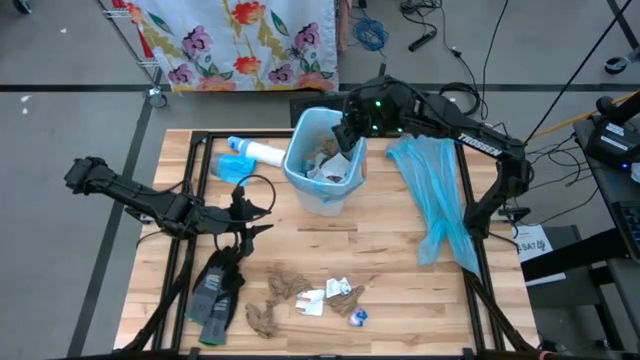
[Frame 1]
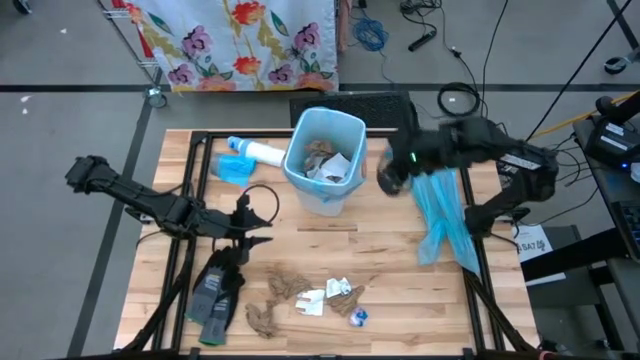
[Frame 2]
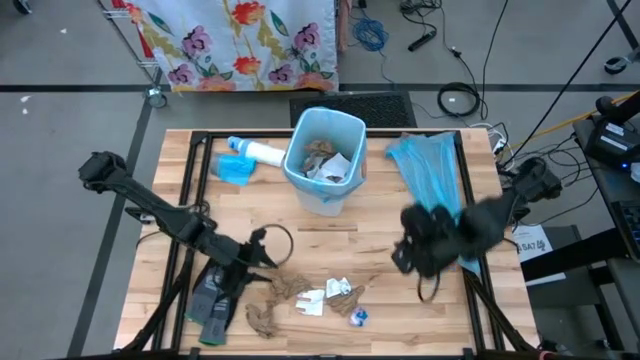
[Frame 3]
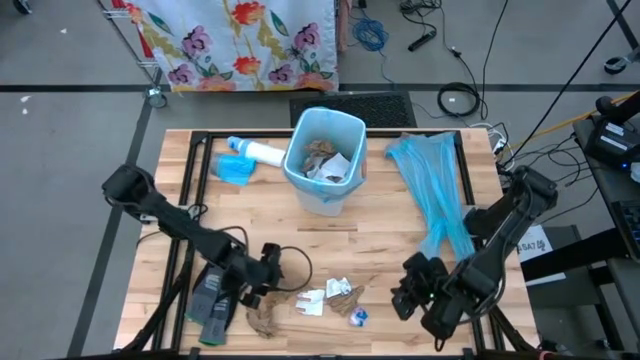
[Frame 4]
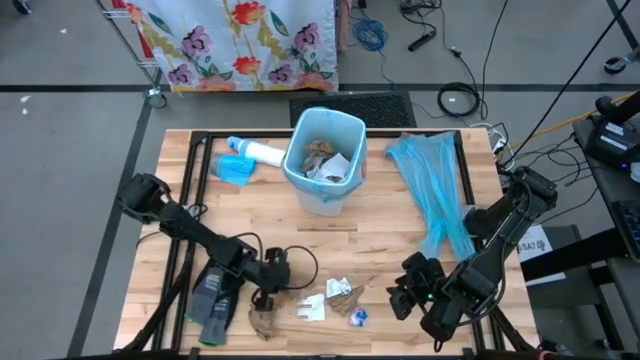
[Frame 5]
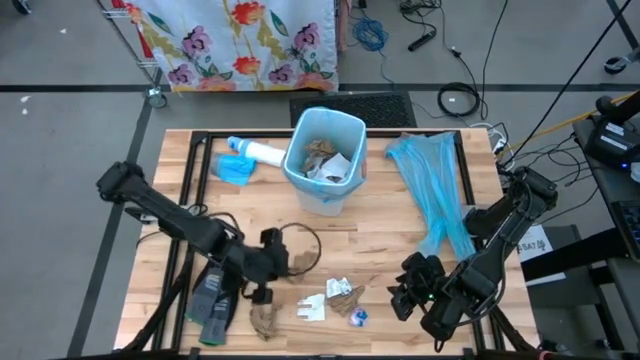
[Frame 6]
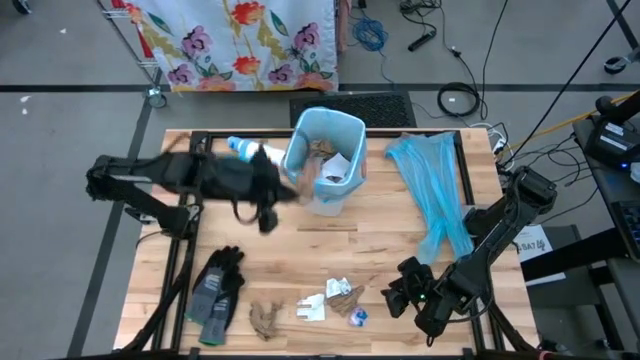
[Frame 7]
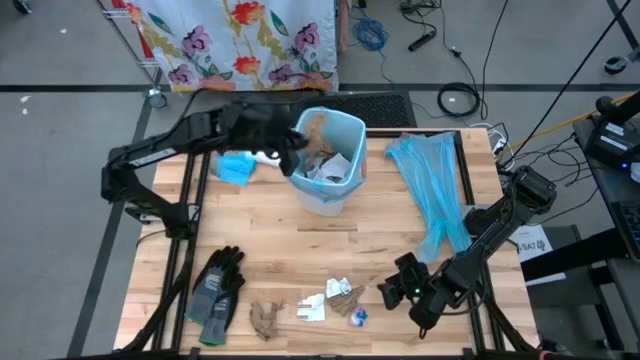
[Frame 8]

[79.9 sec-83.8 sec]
Task: place trash/remove bag and relplace
Put the brown paper into the trash bin

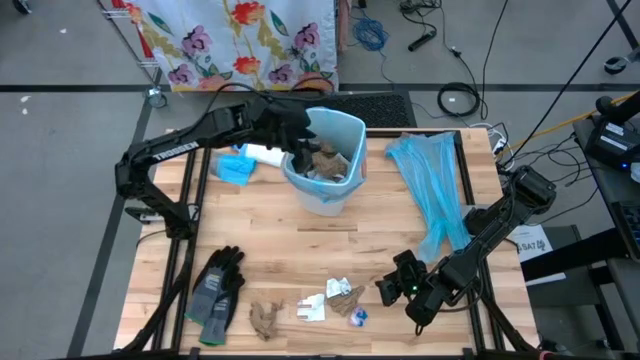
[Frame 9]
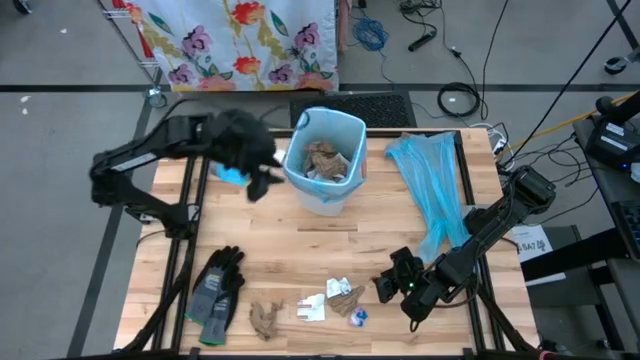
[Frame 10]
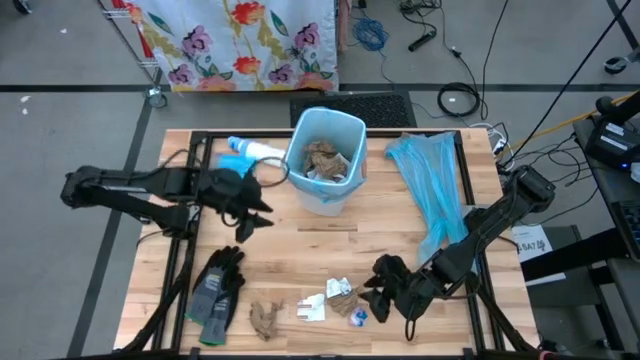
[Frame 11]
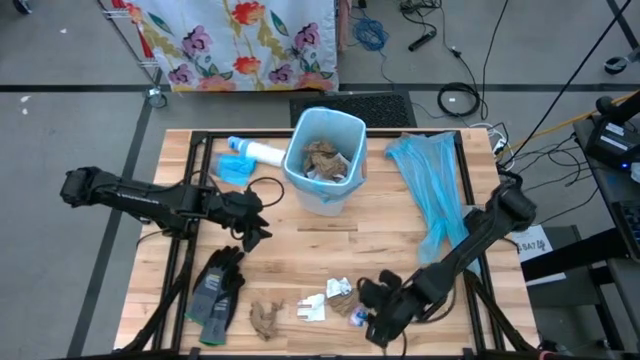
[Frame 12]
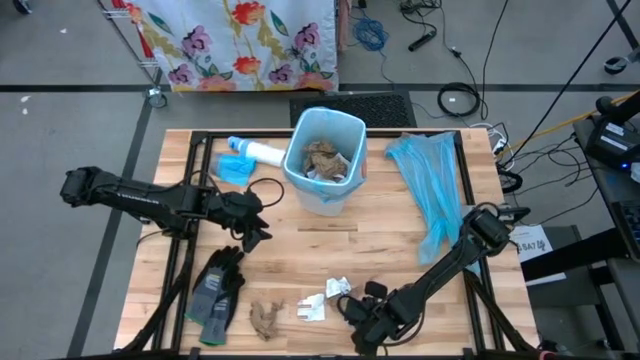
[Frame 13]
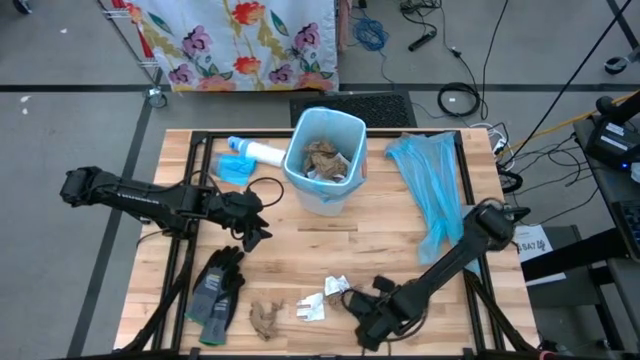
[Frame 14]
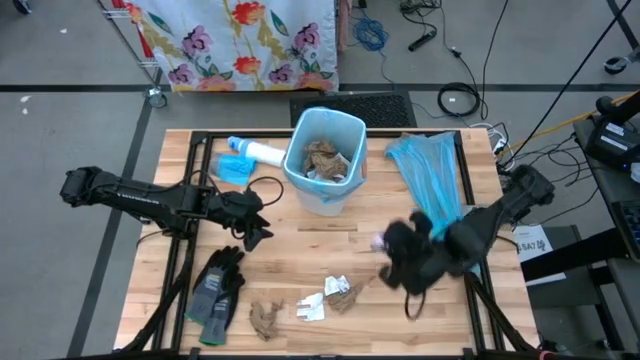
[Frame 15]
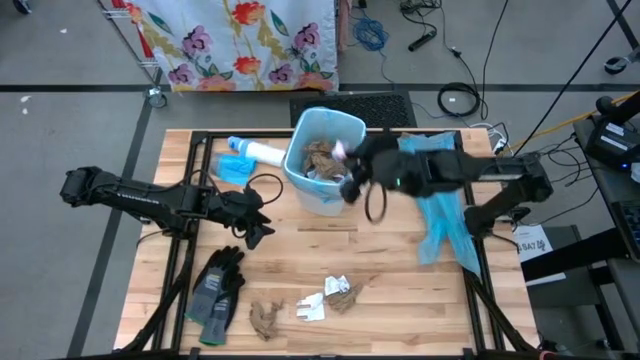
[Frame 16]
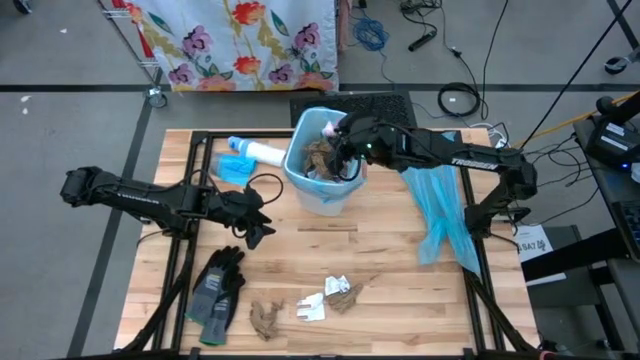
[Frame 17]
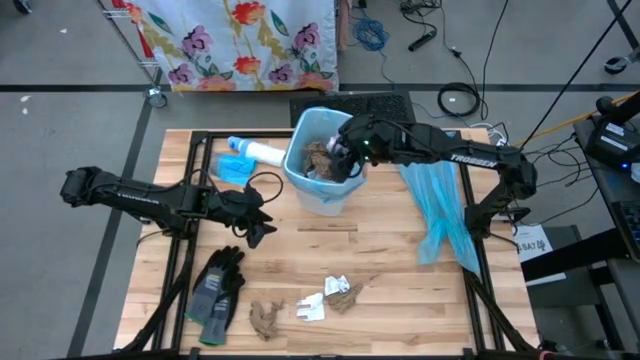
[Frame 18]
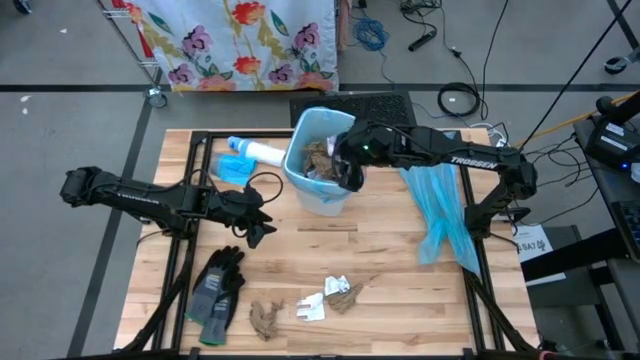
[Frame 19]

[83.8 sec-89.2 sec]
Put the pink trashbag into the trash bin

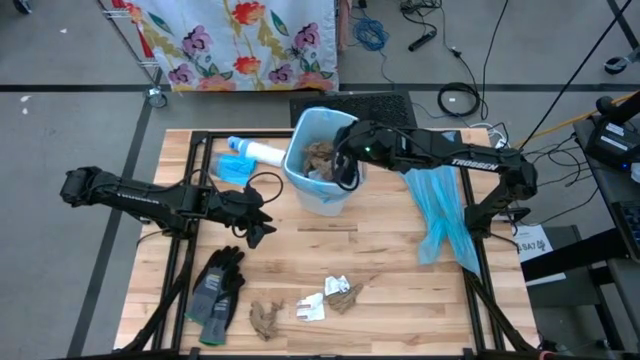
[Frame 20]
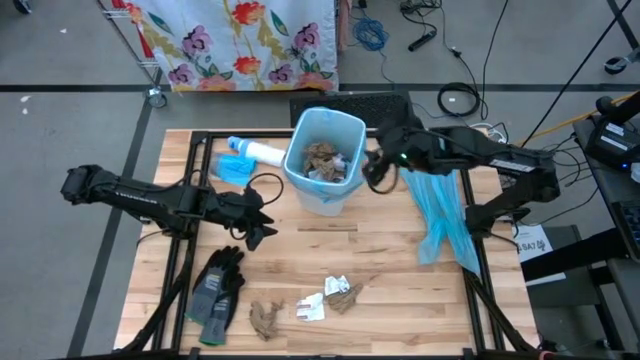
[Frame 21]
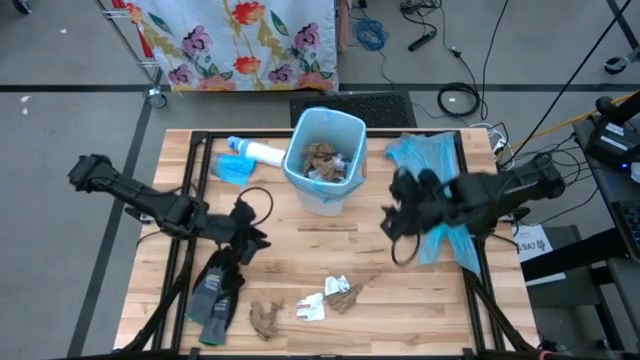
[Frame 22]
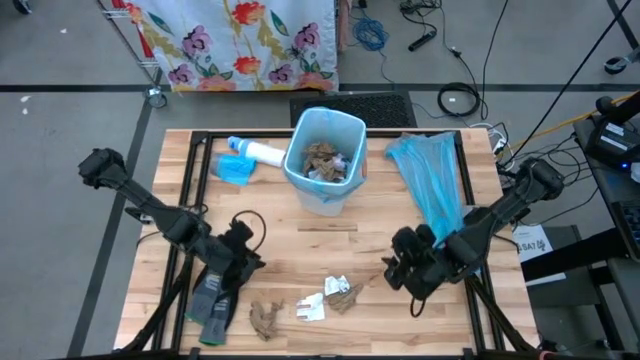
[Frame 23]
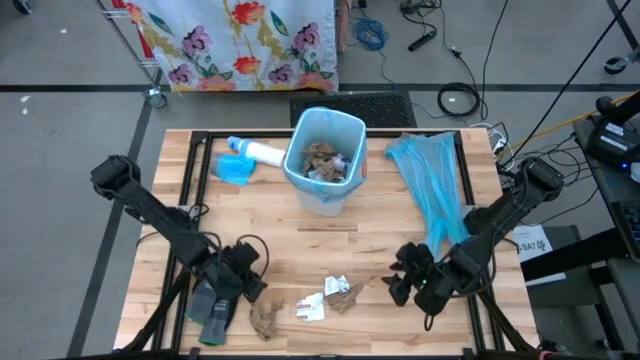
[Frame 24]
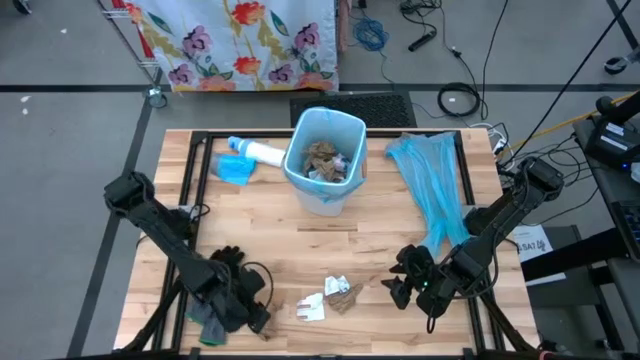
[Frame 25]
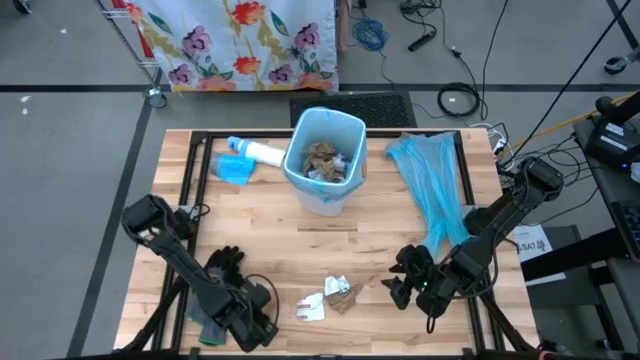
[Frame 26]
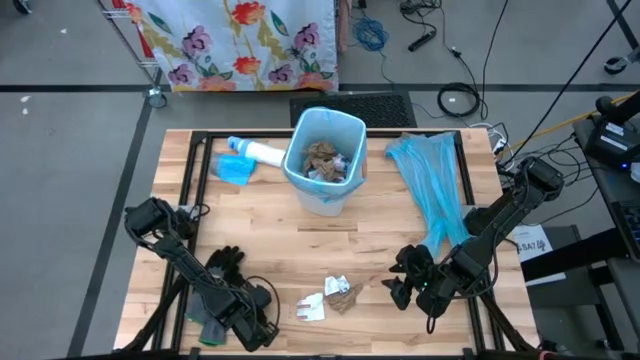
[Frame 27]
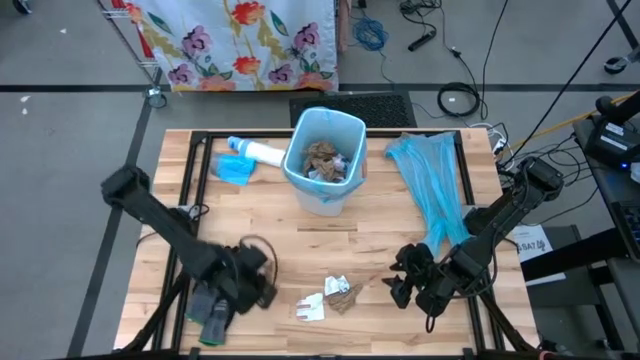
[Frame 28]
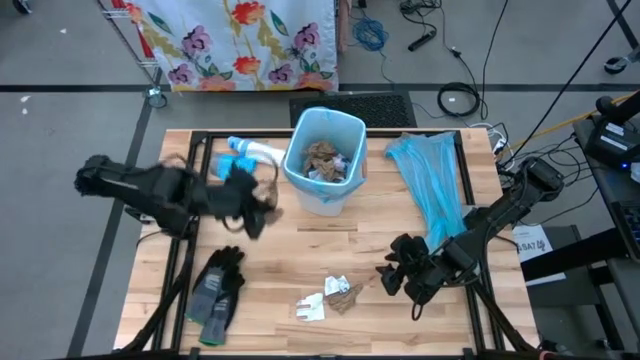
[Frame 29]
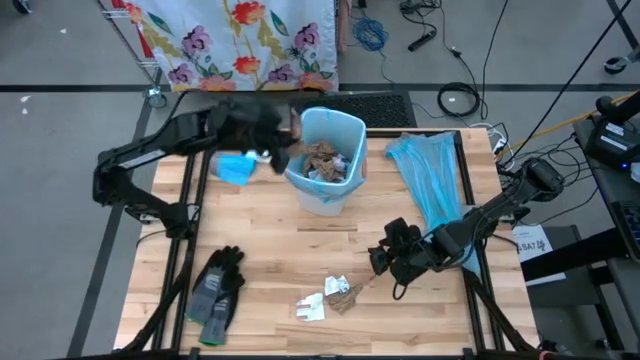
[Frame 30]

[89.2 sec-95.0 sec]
Put the brown paper into the trash bin

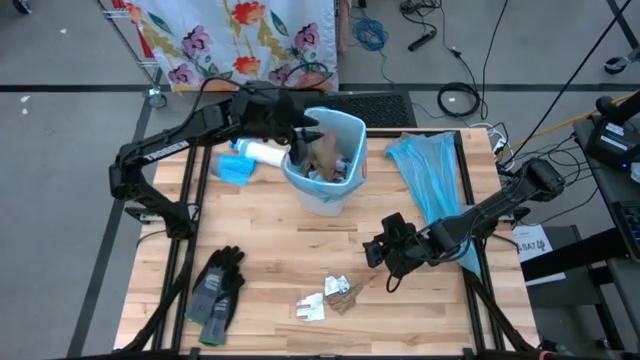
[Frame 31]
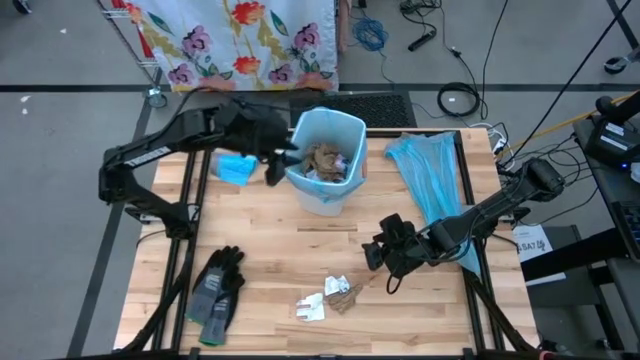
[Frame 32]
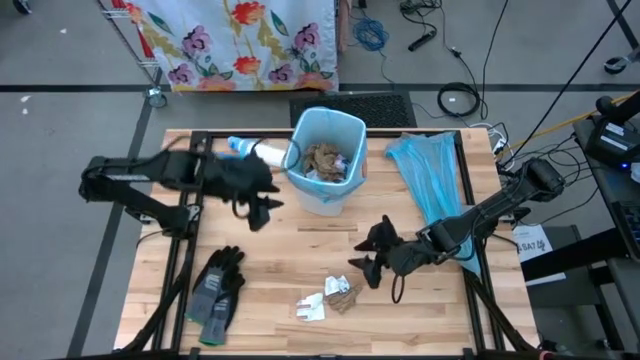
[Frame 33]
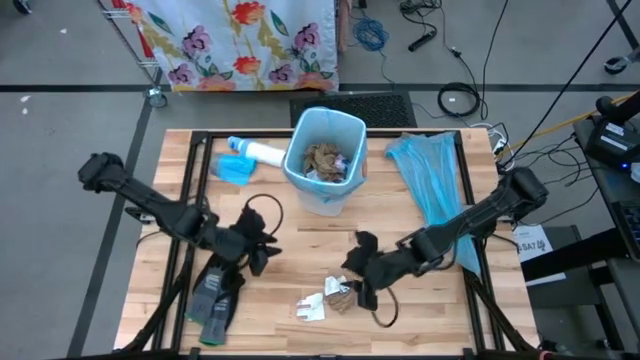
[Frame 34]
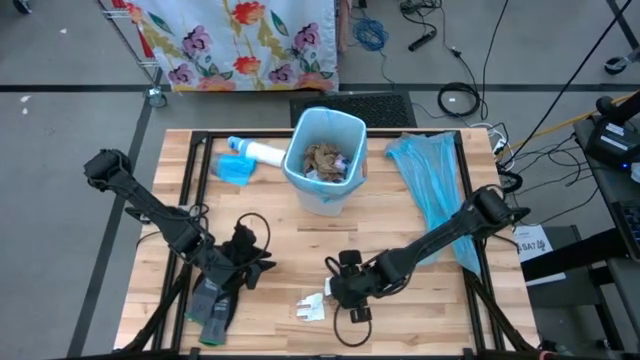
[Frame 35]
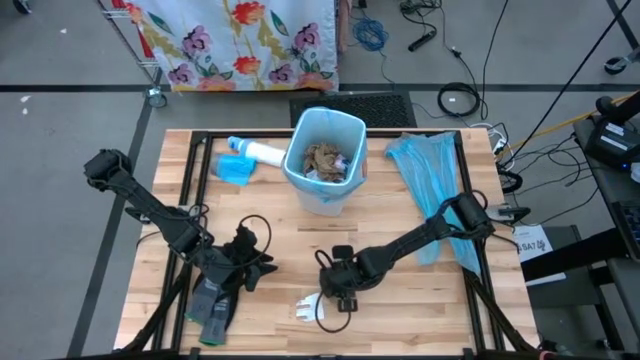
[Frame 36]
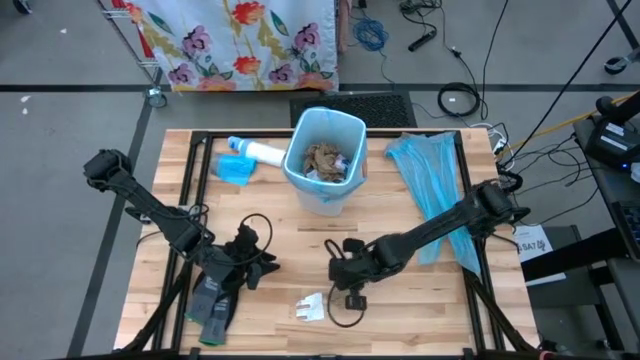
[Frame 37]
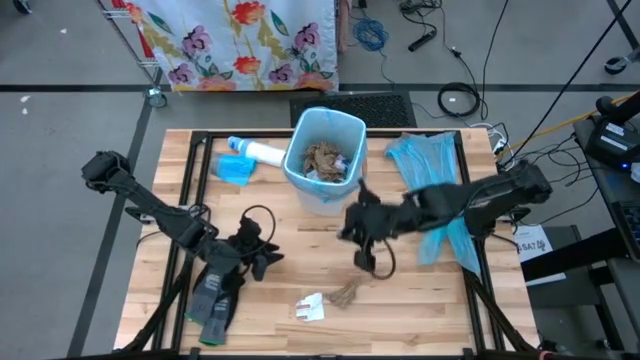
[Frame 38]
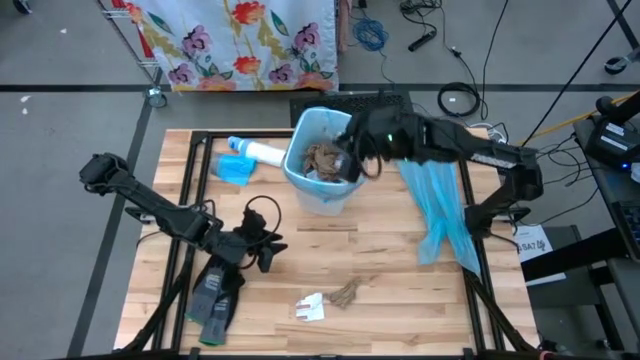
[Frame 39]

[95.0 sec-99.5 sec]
Put the white paper into the trash bin

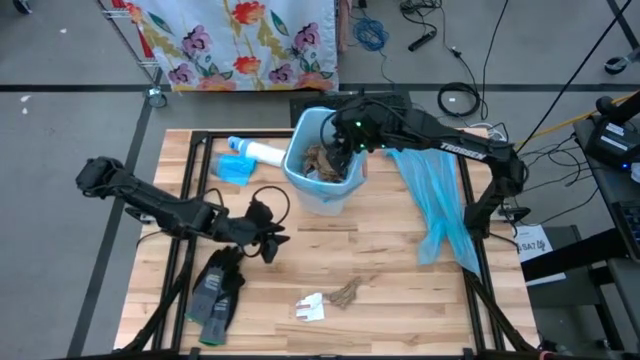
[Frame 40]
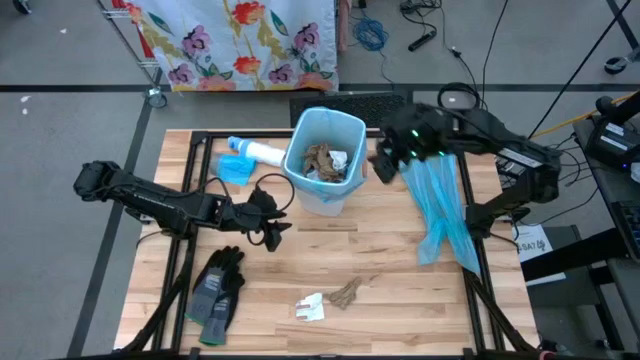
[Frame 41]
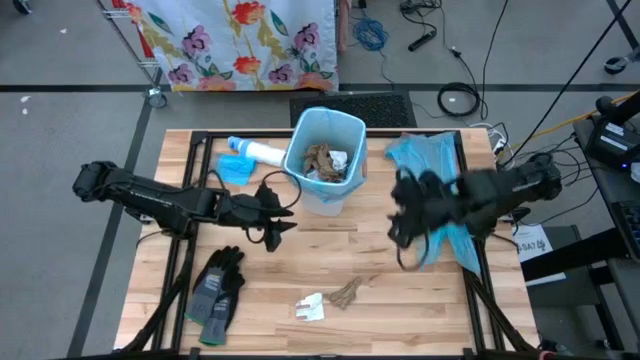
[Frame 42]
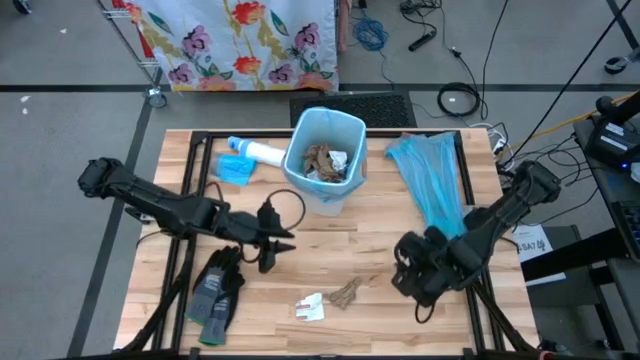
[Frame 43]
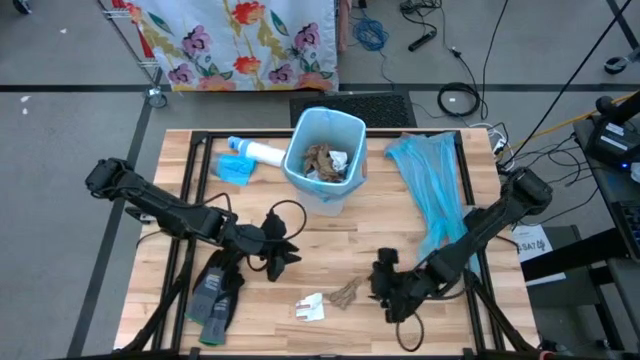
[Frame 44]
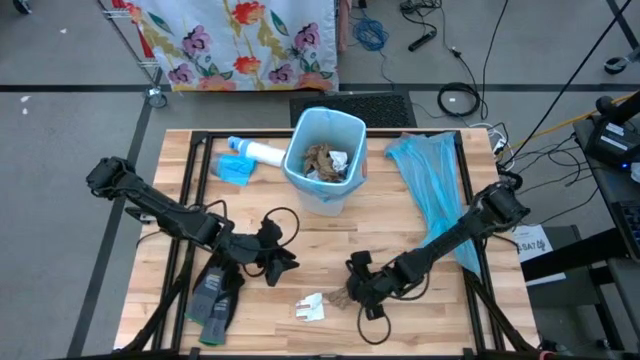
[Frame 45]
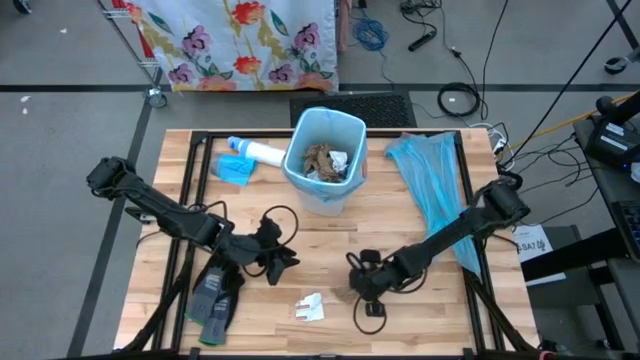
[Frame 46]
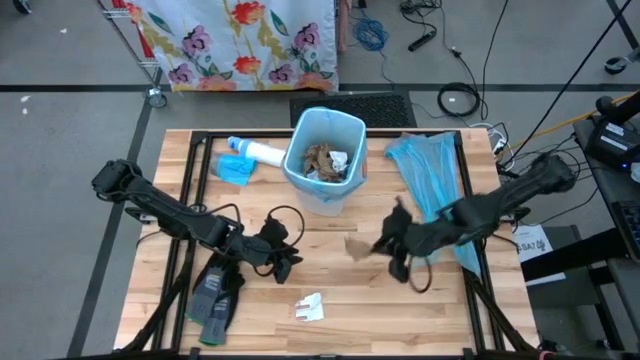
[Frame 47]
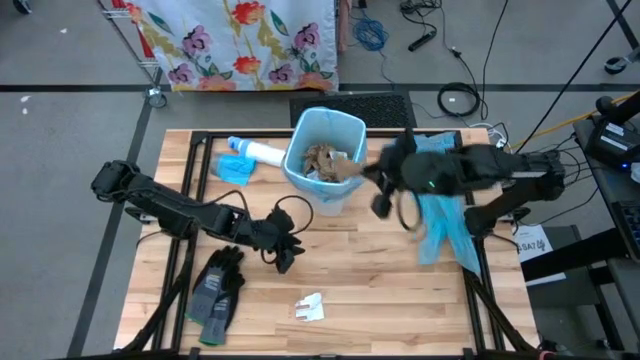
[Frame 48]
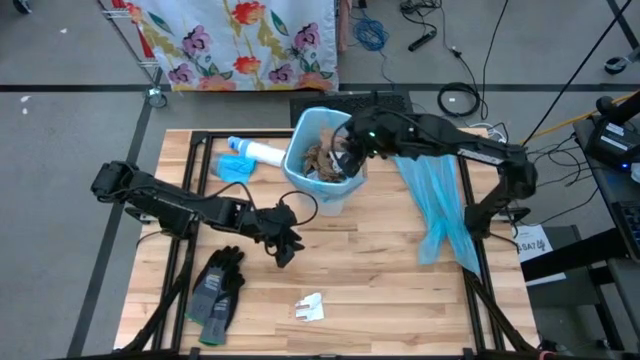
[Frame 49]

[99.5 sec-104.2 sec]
Put the brown paper into the trash bin
